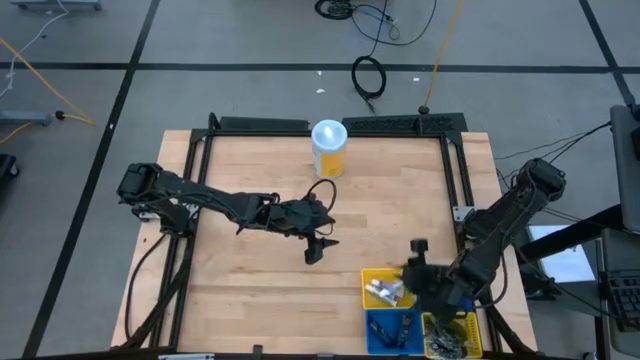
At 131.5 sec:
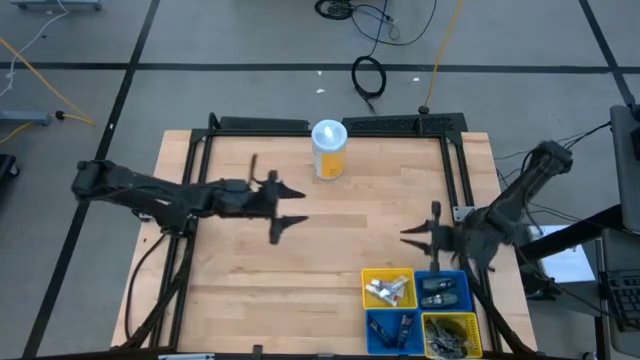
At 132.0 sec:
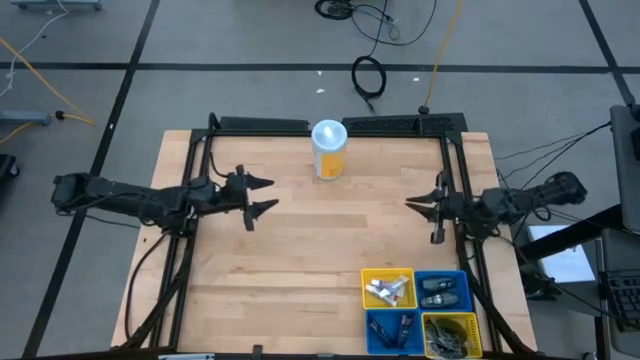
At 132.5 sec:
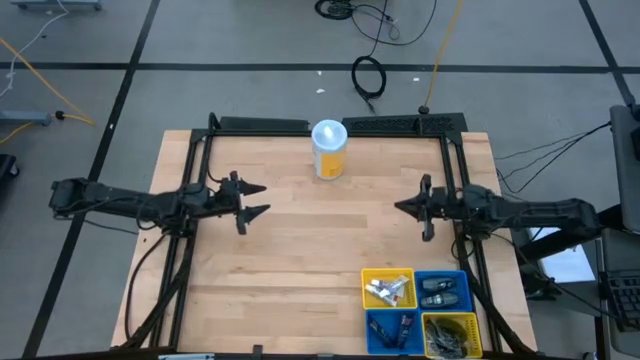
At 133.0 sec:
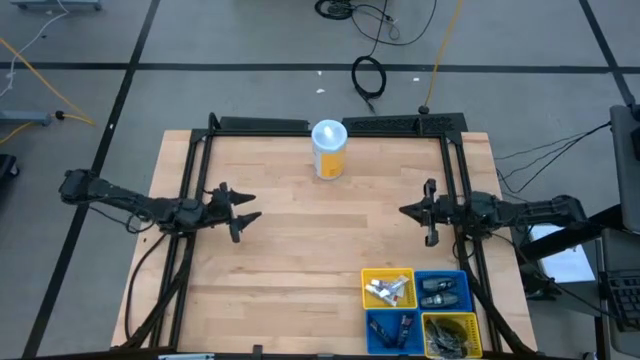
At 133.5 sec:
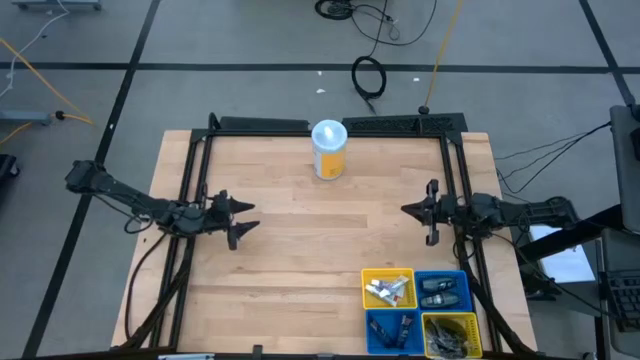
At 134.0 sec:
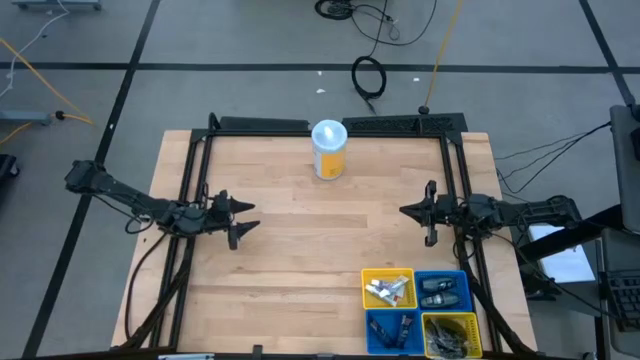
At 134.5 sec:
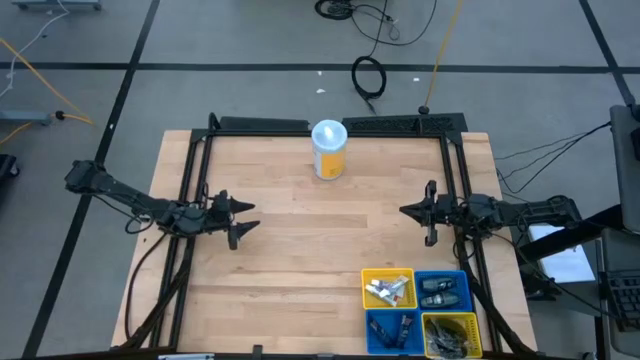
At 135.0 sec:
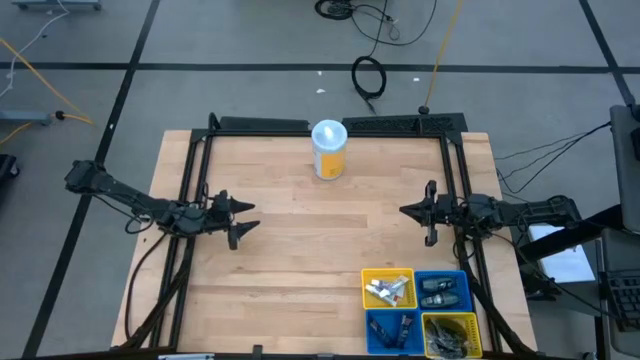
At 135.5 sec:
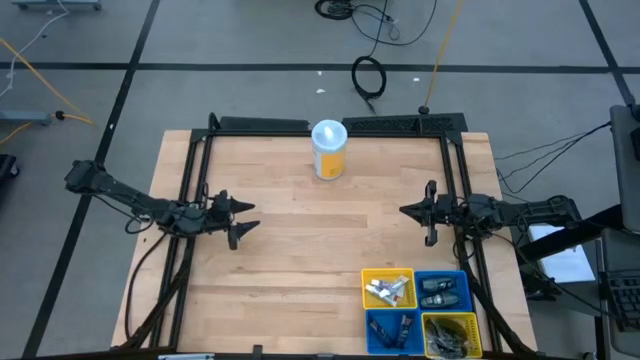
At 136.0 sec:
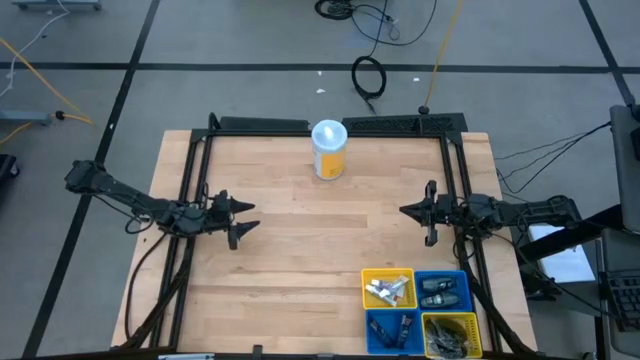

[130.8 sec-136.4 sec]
Task: Pick & Place Travel size toiletries
Return to Home Position

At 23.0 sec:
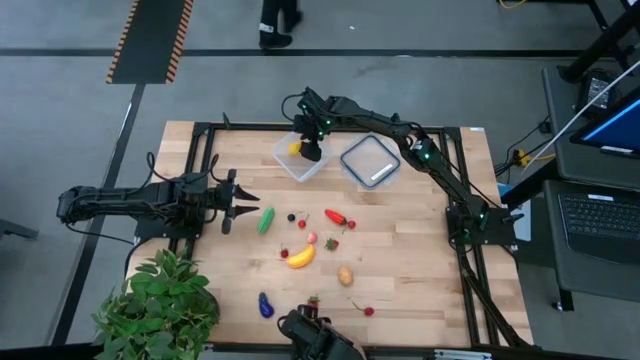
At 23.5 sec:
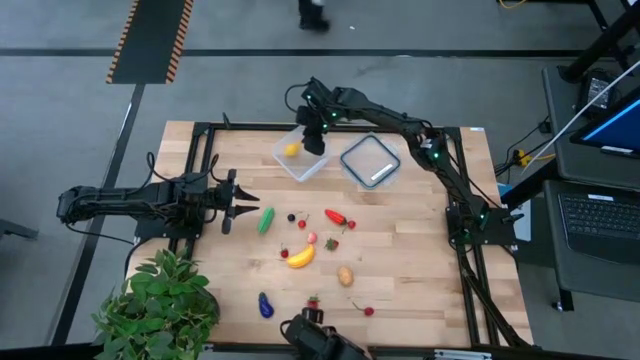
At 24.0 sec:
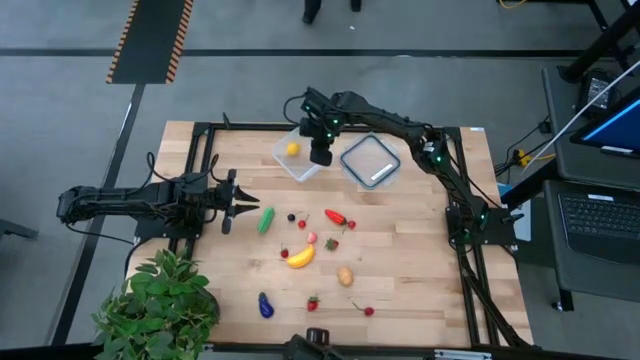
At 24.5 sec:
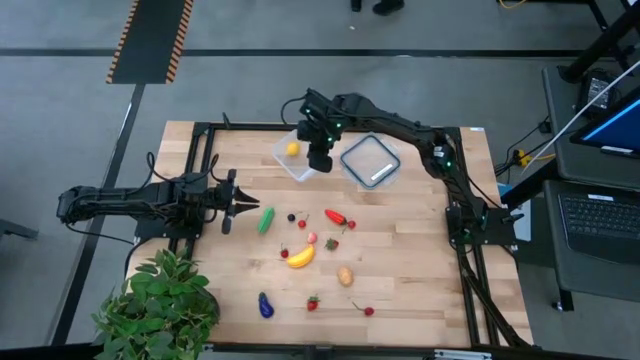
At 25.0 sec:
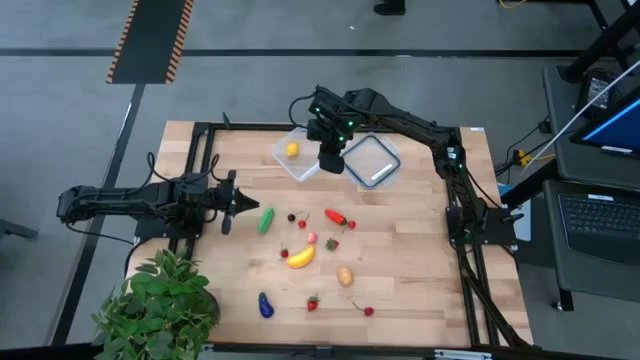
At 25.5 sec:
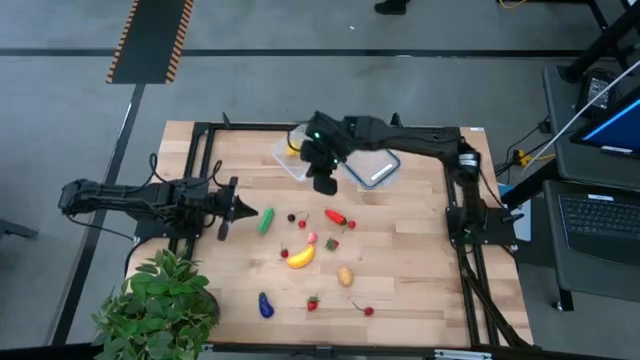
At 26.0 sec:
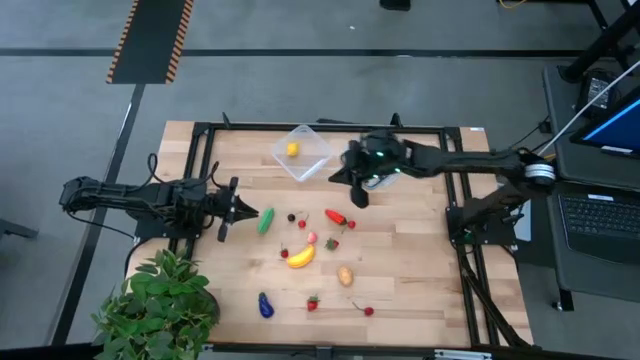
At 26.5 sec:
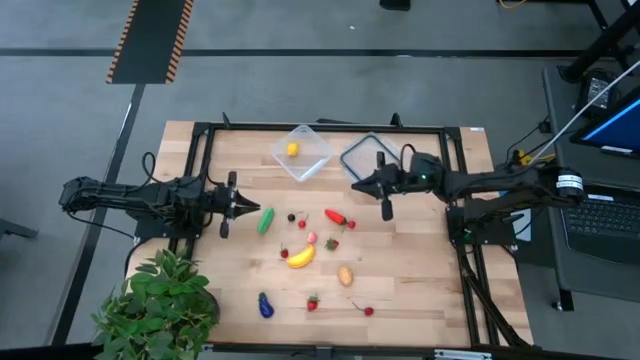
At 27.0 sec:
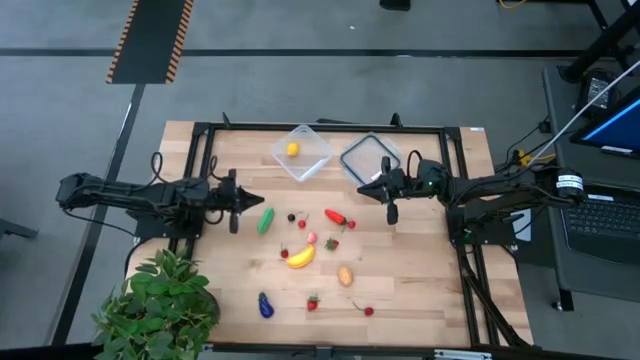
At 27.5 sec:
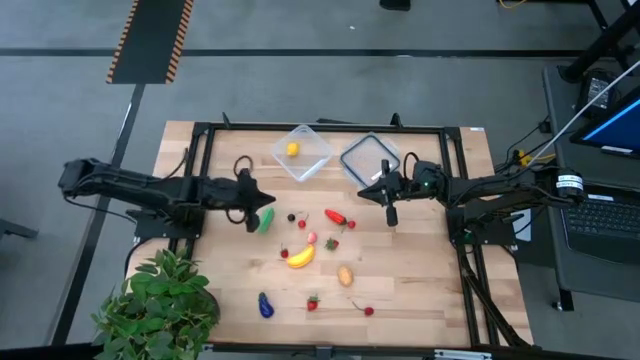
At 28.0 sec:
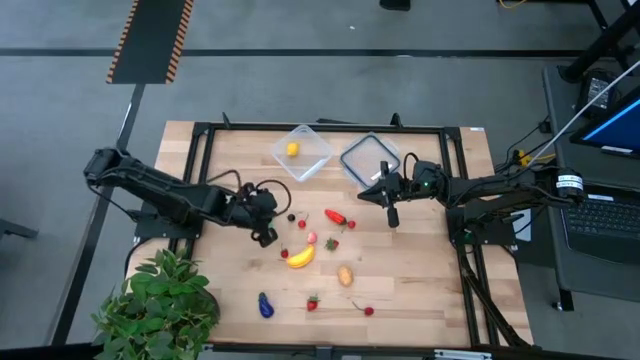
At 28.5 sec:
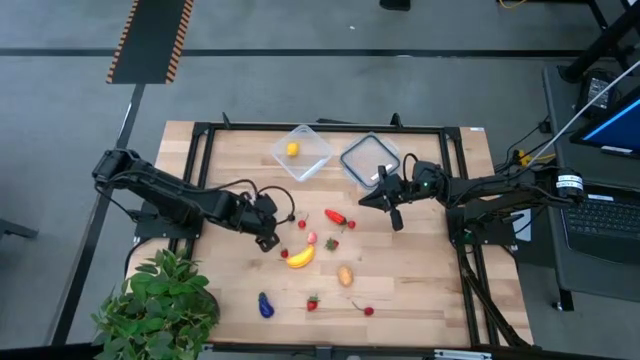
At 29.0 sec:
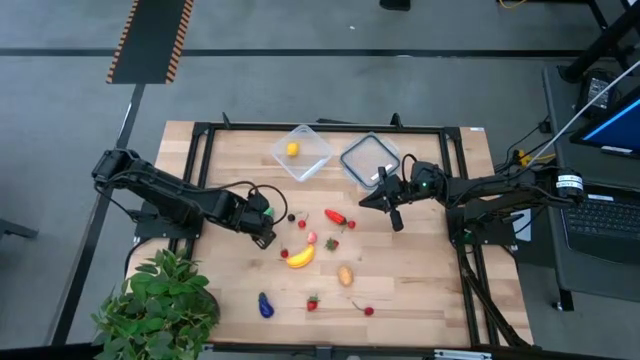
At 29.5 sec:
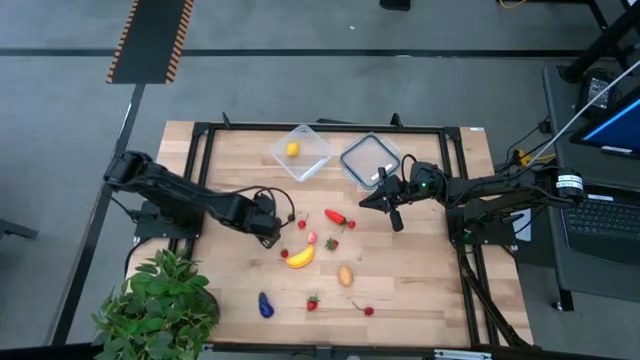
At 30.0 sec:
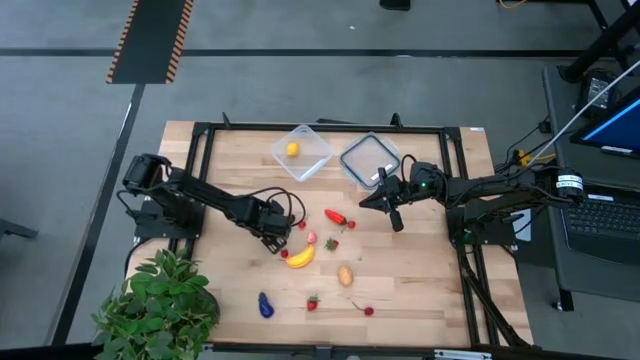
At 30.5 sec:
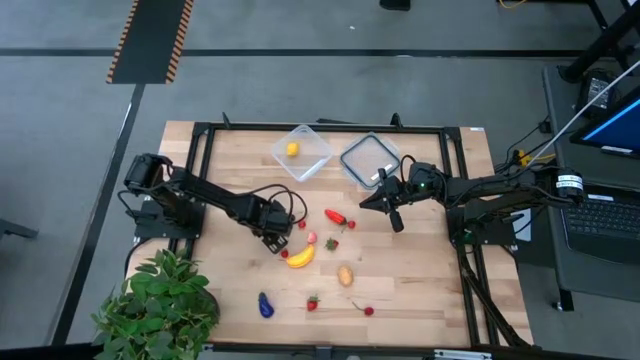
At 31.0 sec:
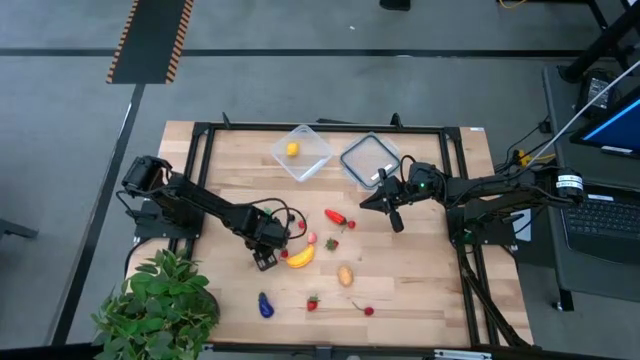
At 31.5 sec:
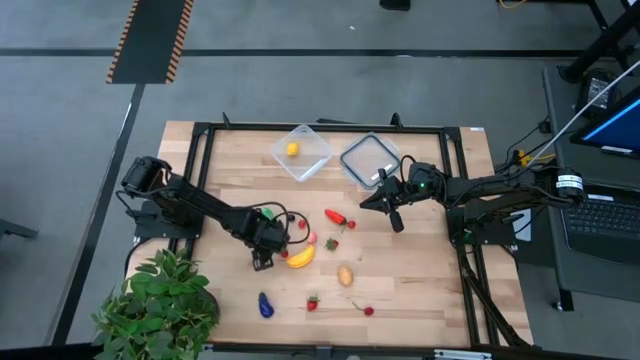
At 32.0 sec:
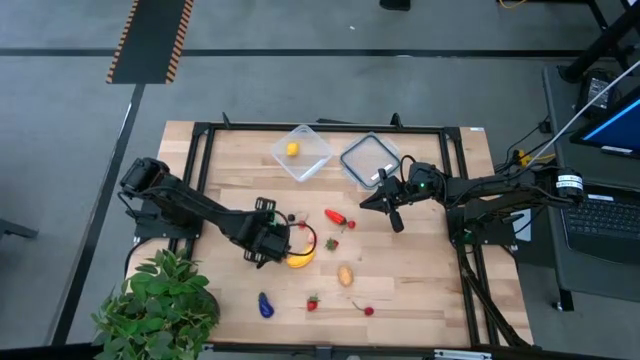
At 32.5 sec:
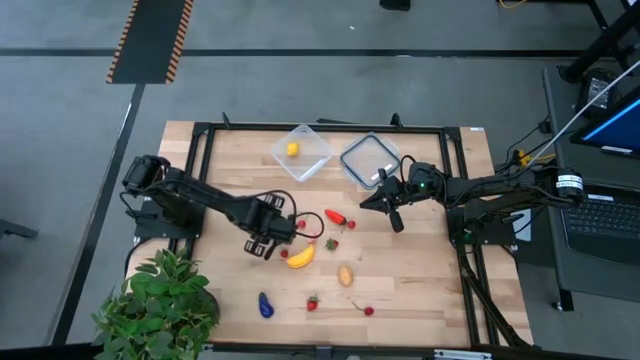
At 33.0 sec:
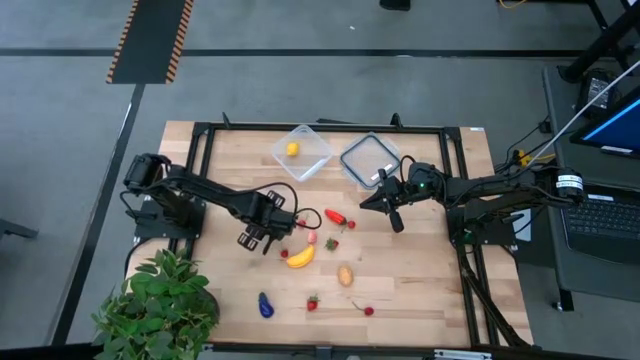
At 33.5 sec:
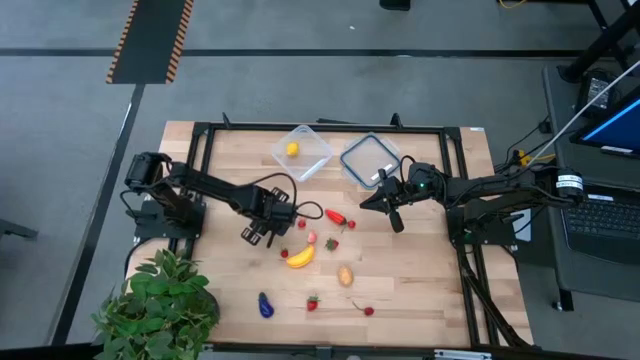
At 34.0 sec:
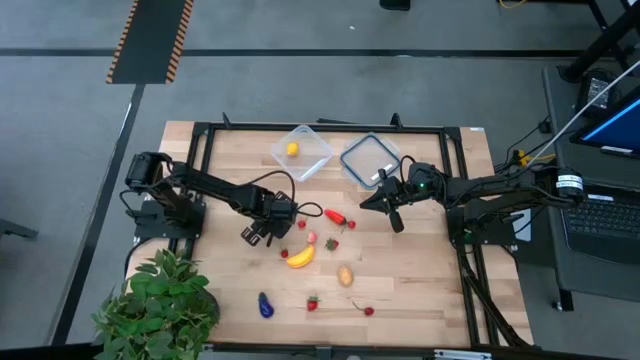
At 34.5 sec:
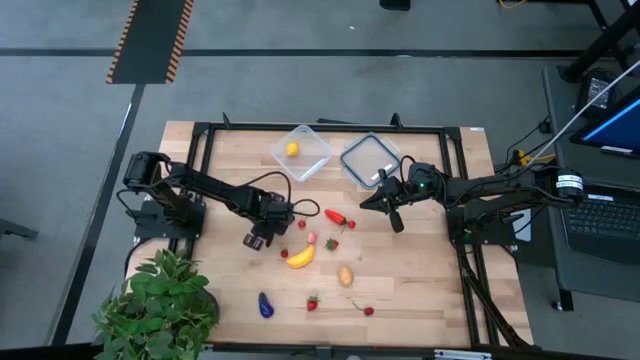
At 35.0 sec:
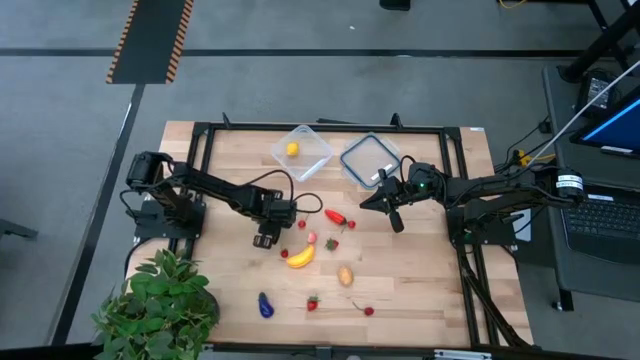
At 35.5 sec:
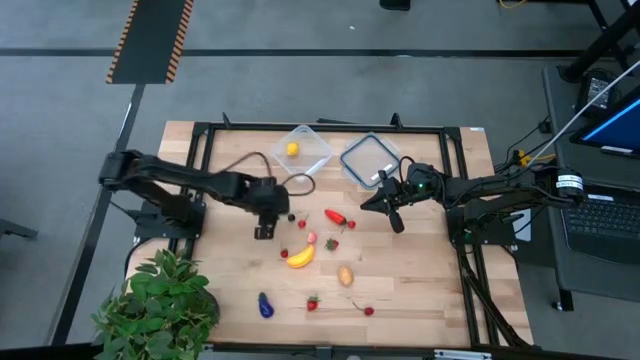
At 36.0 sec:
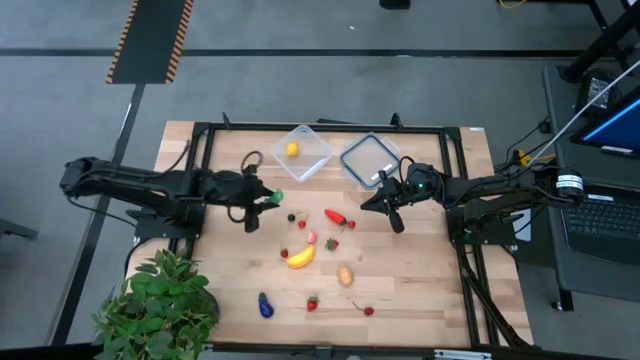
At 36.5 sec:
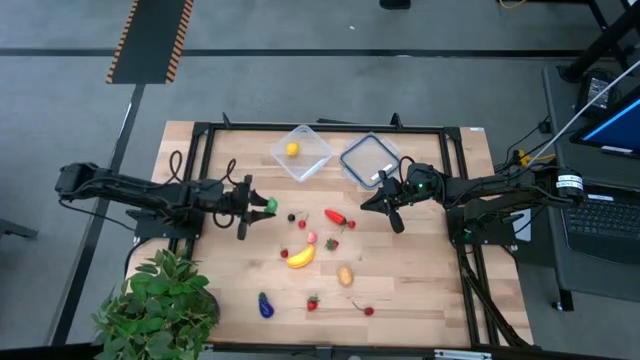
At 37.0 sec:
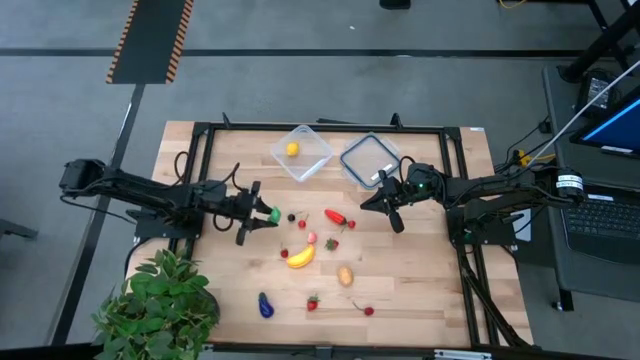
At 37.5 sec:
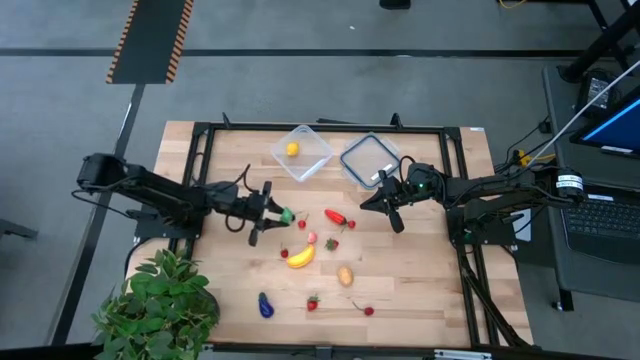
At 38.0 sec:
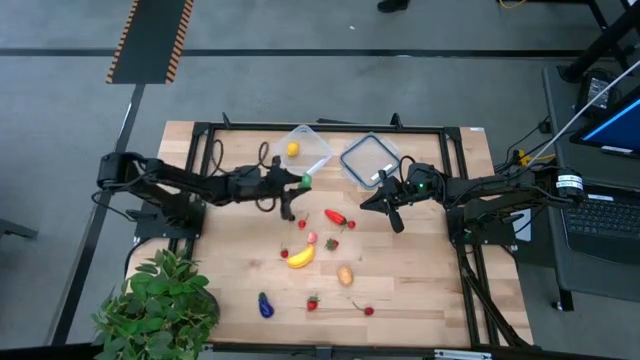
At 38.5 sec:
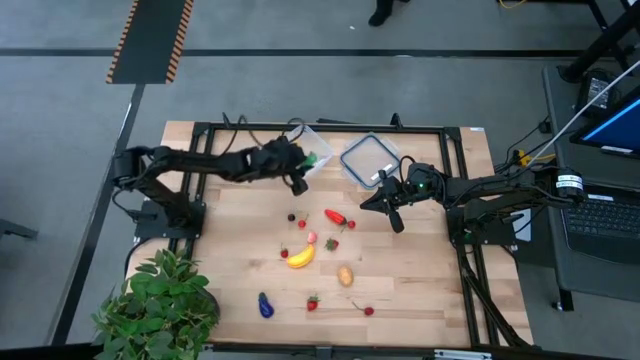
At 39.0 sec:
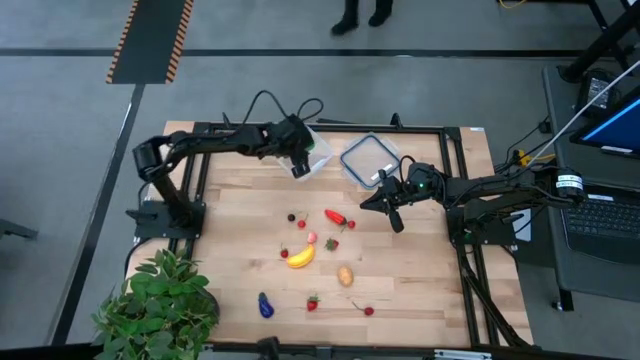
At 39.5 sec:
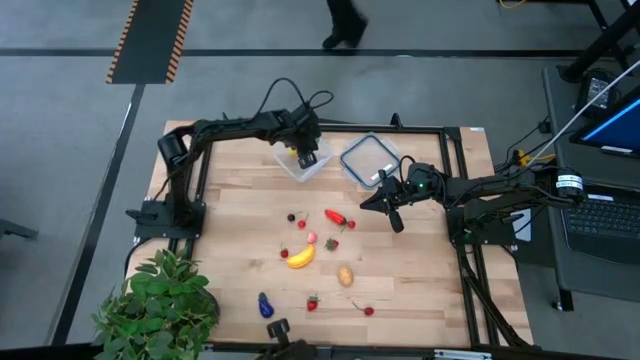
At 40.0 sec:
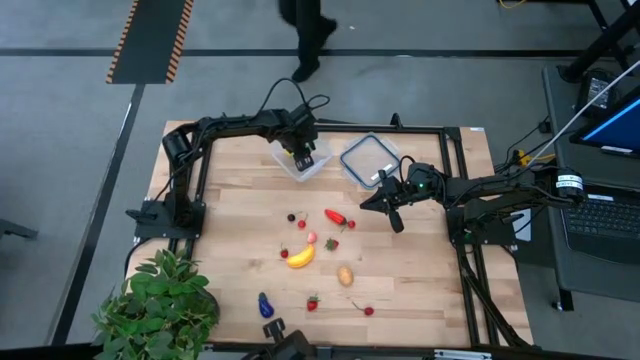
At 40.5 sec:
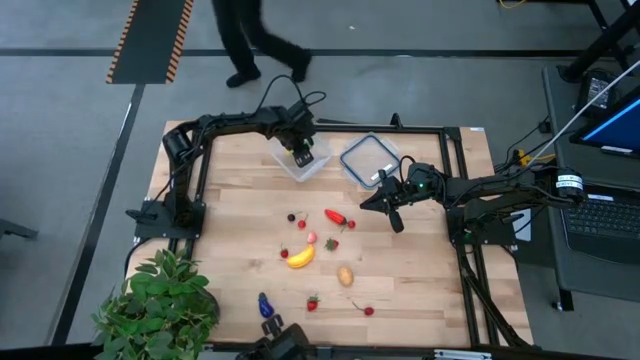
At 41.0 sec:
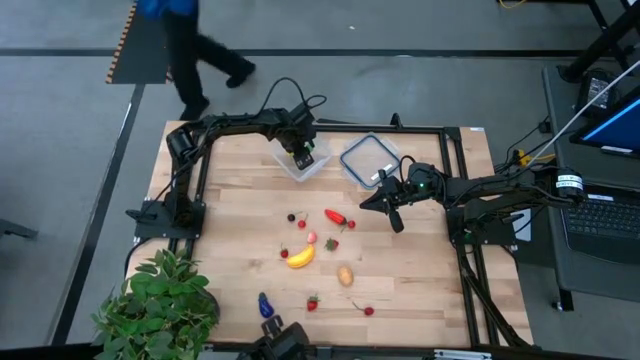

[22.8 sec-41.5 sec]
Task: Pick and placing Produce into tupperware
Put the pea pod into the transparent container
